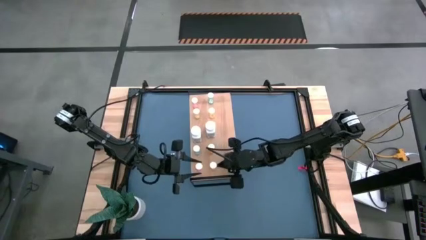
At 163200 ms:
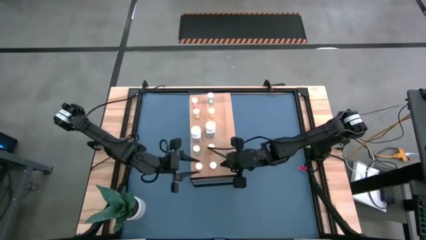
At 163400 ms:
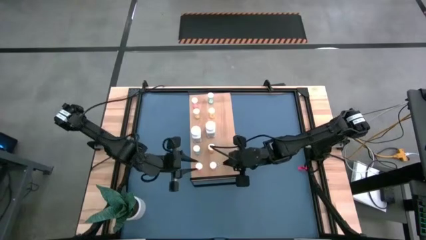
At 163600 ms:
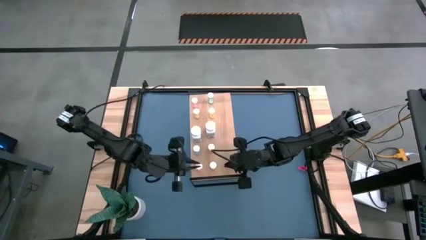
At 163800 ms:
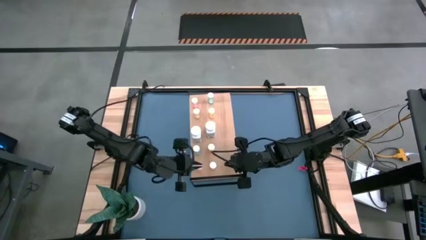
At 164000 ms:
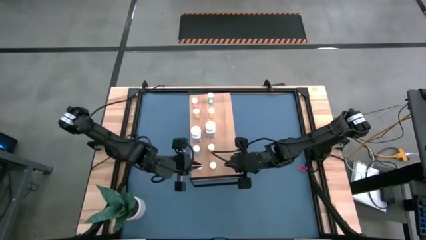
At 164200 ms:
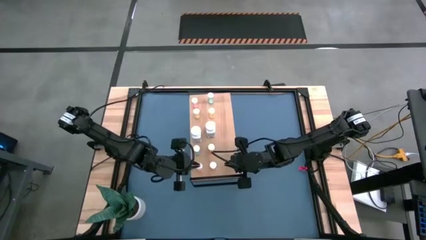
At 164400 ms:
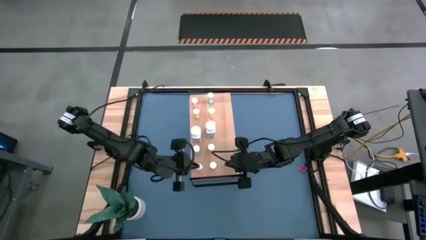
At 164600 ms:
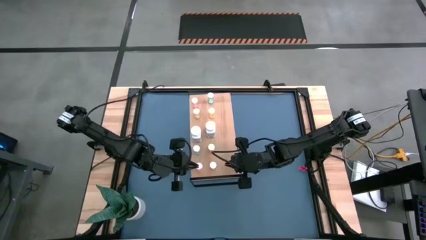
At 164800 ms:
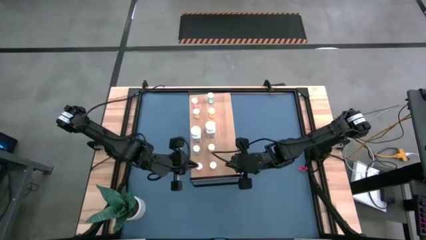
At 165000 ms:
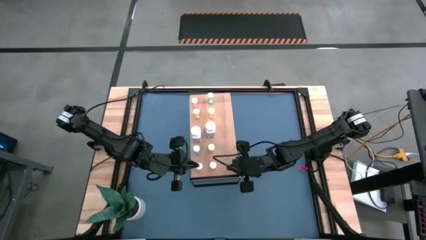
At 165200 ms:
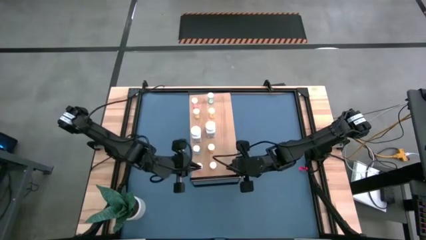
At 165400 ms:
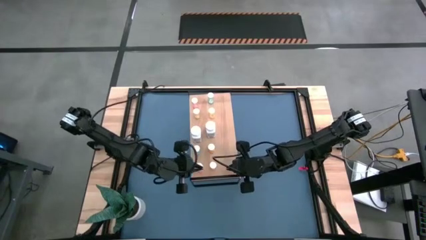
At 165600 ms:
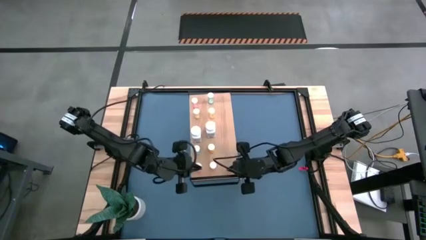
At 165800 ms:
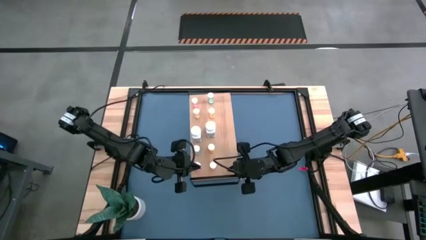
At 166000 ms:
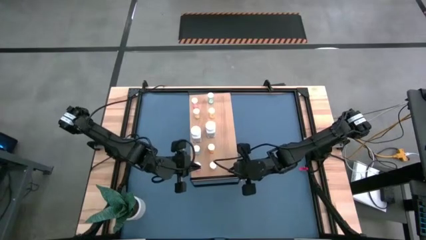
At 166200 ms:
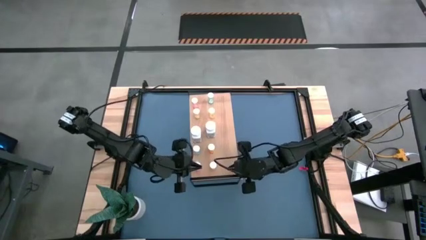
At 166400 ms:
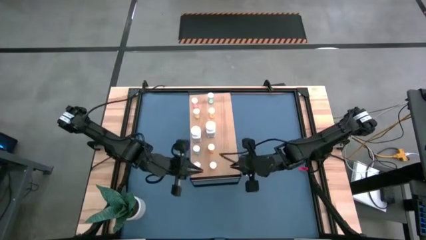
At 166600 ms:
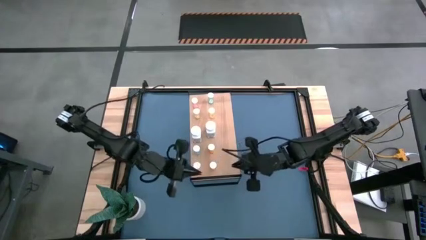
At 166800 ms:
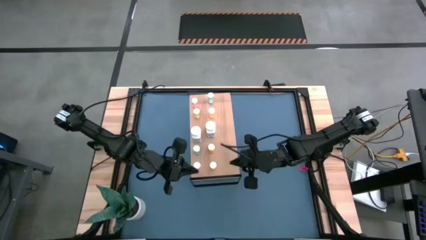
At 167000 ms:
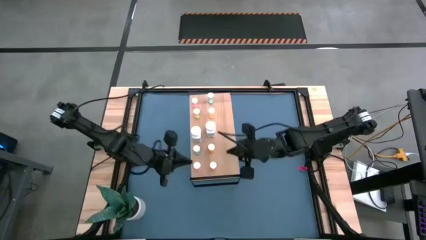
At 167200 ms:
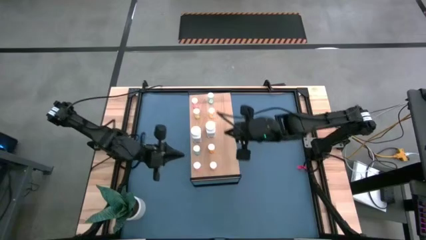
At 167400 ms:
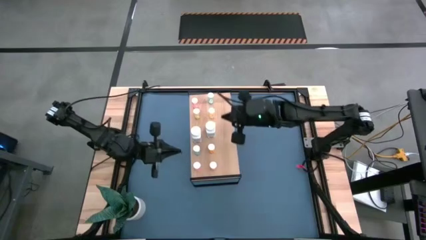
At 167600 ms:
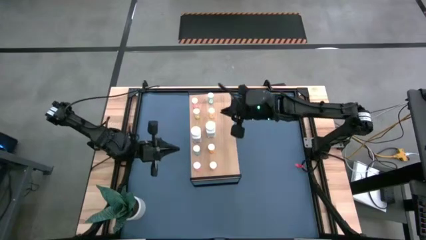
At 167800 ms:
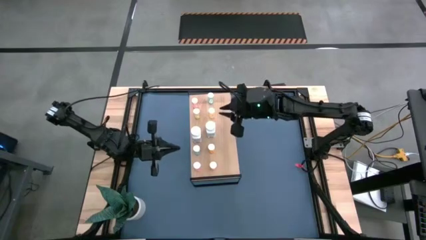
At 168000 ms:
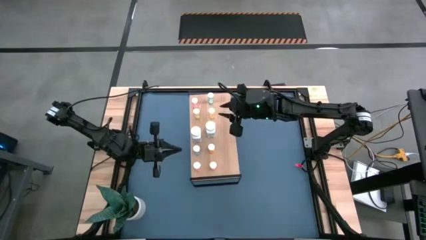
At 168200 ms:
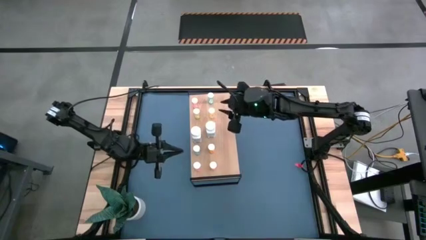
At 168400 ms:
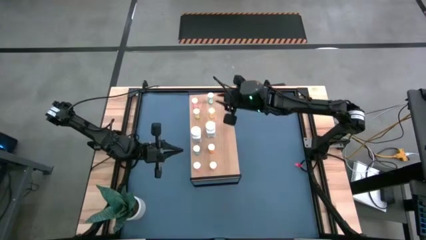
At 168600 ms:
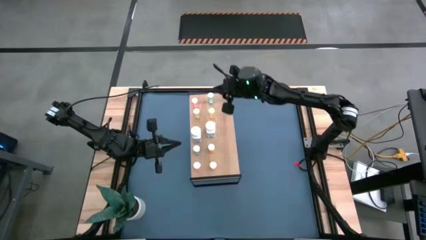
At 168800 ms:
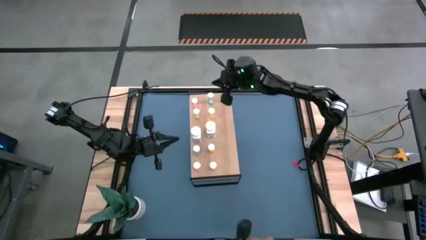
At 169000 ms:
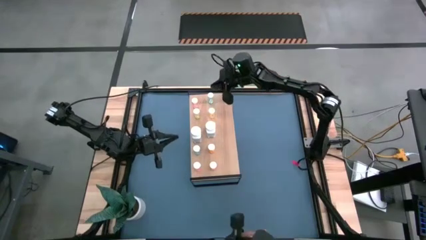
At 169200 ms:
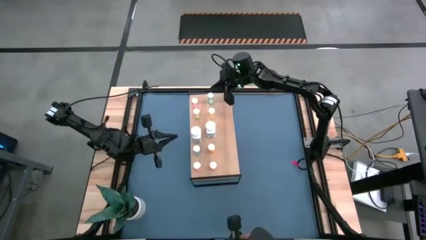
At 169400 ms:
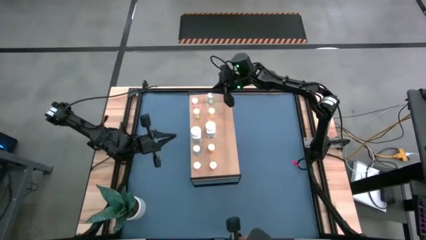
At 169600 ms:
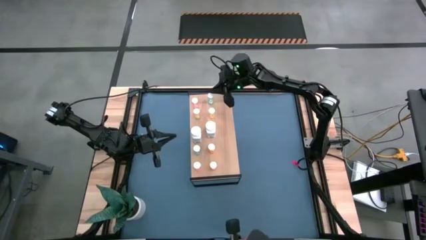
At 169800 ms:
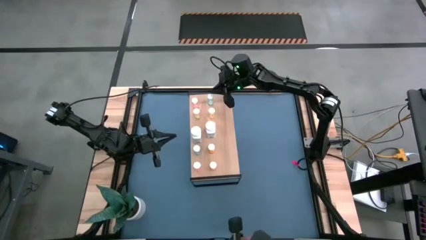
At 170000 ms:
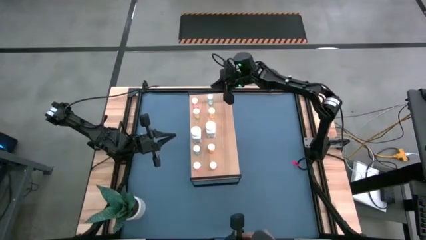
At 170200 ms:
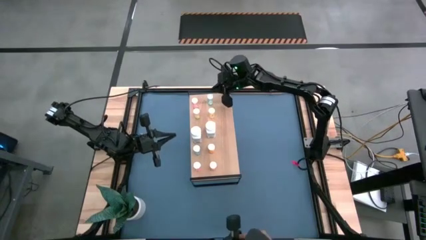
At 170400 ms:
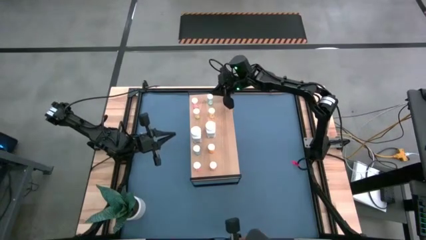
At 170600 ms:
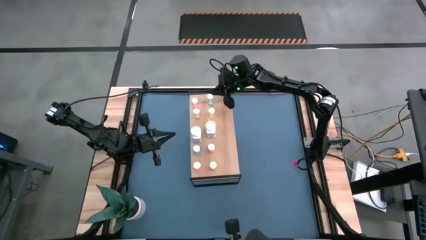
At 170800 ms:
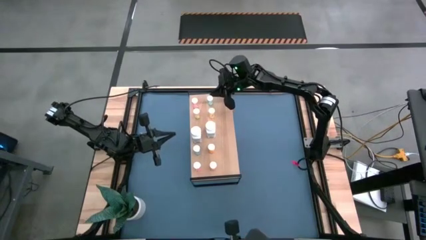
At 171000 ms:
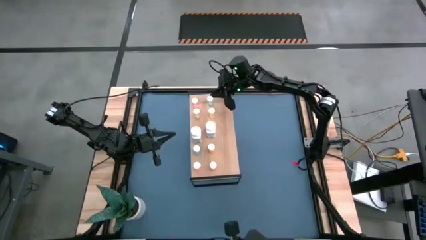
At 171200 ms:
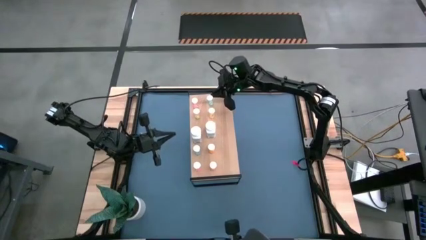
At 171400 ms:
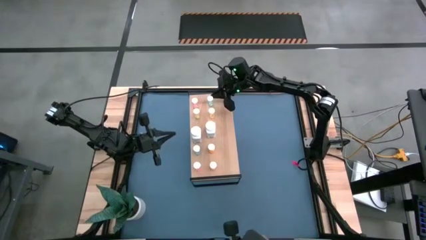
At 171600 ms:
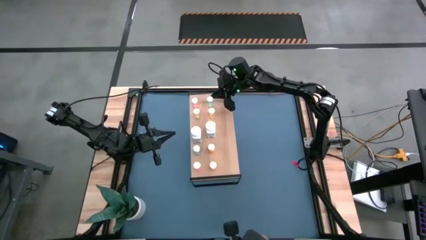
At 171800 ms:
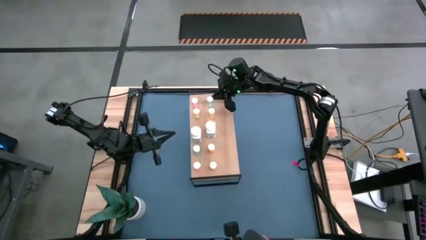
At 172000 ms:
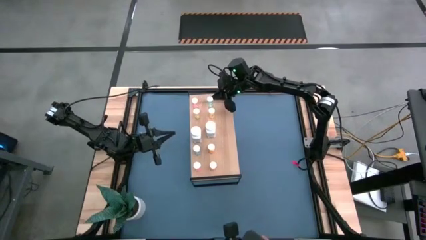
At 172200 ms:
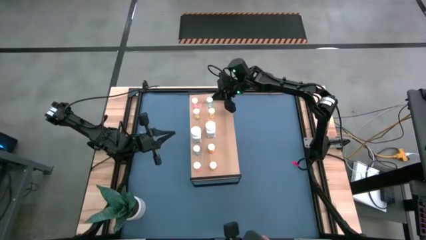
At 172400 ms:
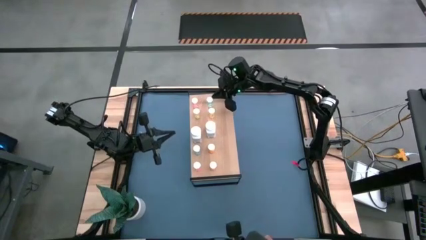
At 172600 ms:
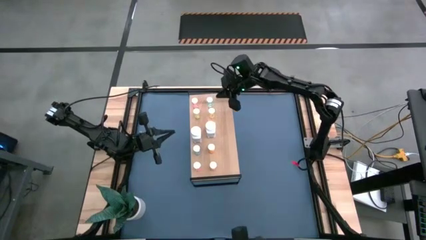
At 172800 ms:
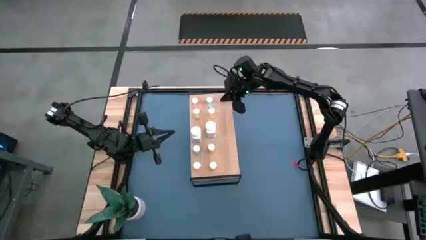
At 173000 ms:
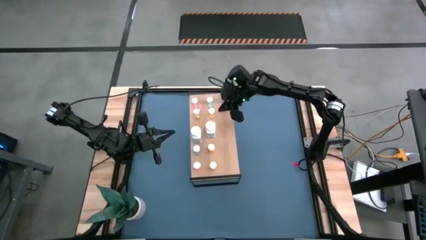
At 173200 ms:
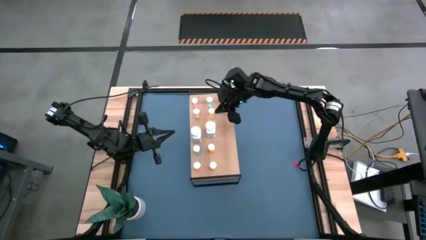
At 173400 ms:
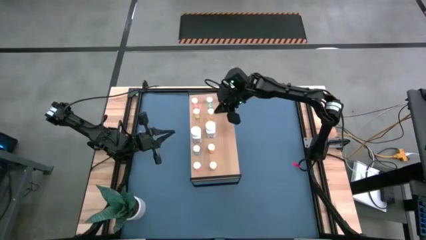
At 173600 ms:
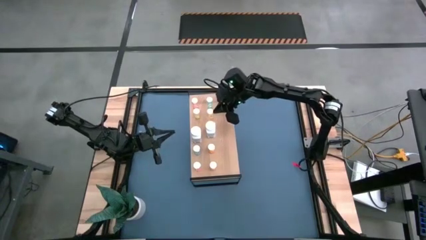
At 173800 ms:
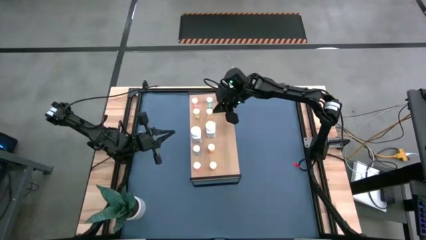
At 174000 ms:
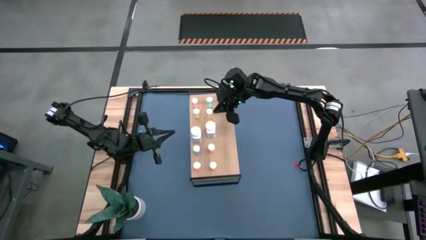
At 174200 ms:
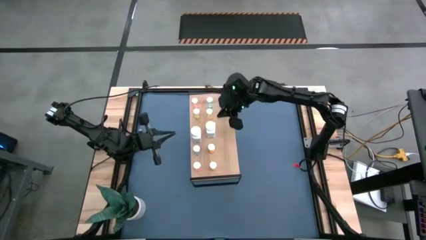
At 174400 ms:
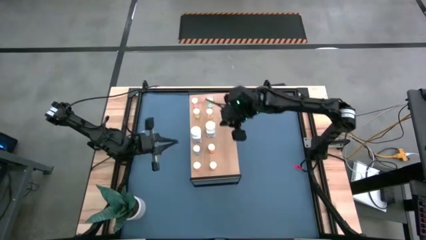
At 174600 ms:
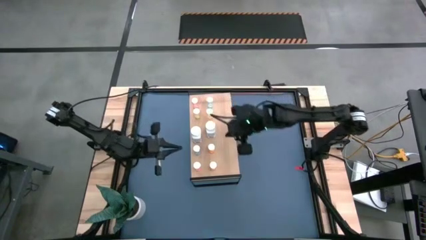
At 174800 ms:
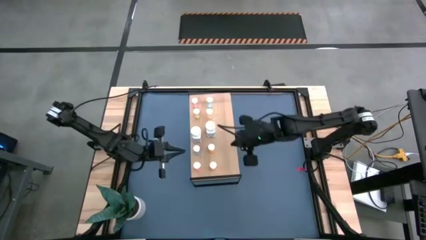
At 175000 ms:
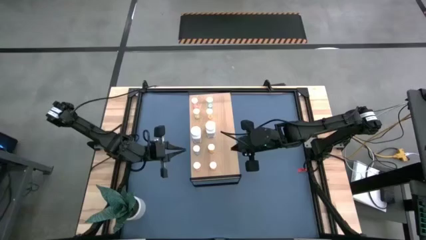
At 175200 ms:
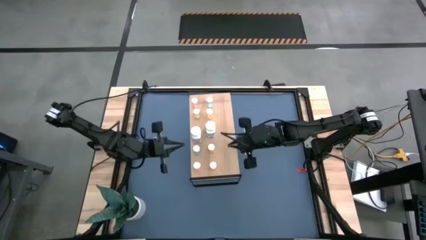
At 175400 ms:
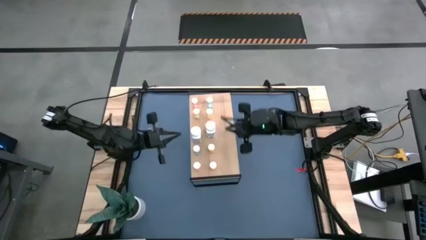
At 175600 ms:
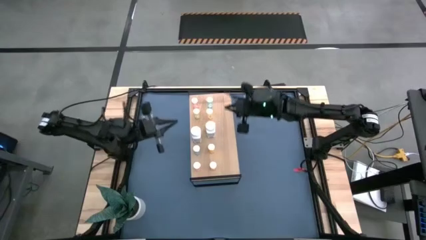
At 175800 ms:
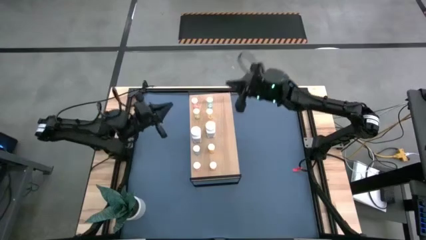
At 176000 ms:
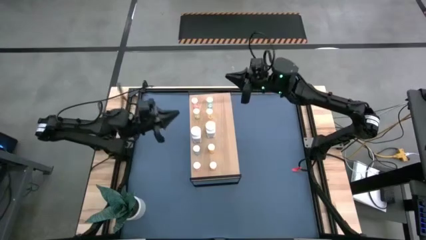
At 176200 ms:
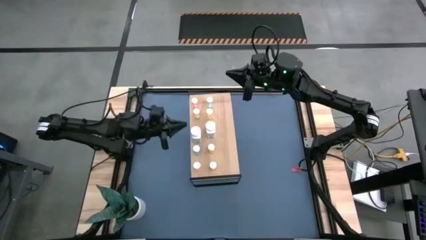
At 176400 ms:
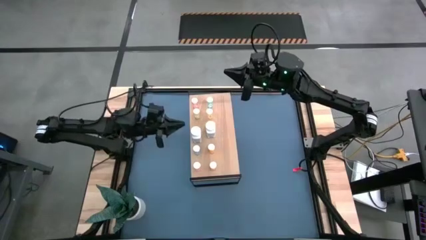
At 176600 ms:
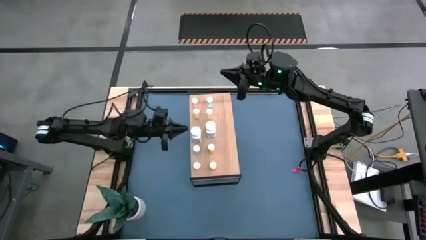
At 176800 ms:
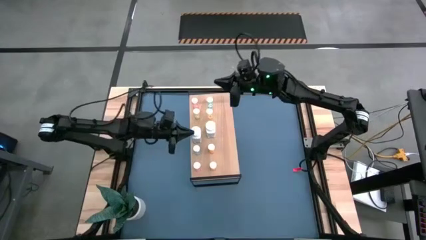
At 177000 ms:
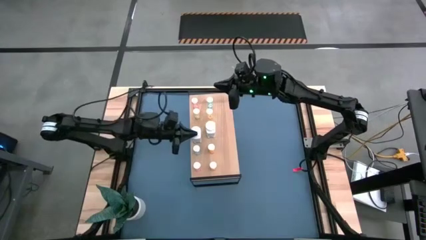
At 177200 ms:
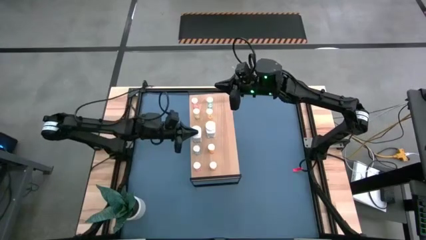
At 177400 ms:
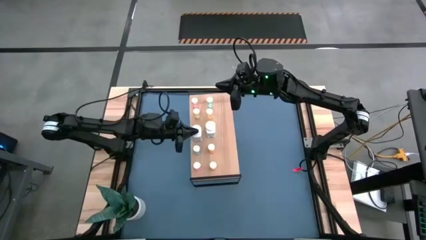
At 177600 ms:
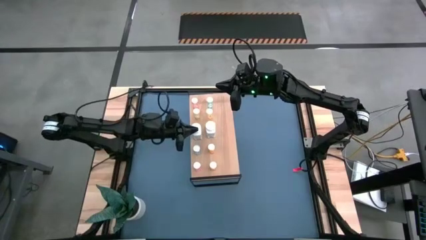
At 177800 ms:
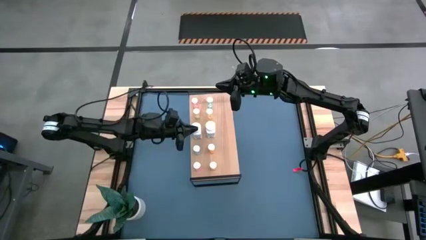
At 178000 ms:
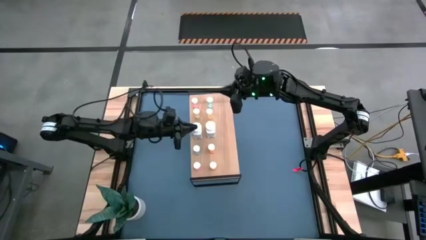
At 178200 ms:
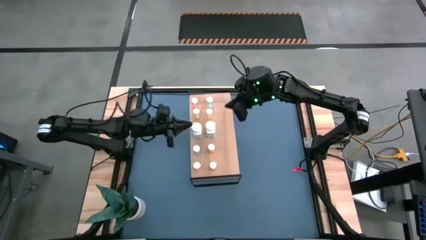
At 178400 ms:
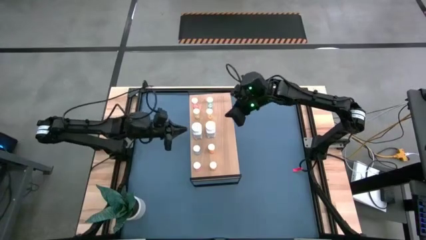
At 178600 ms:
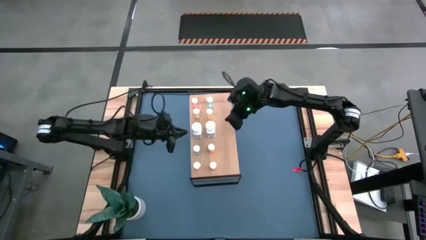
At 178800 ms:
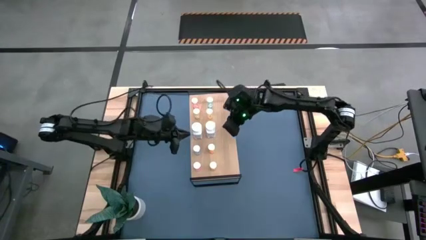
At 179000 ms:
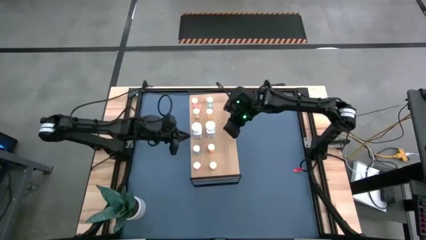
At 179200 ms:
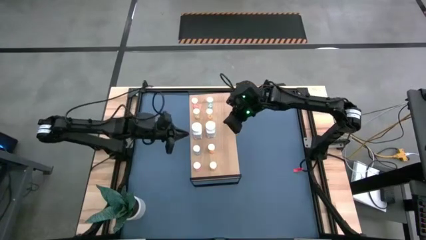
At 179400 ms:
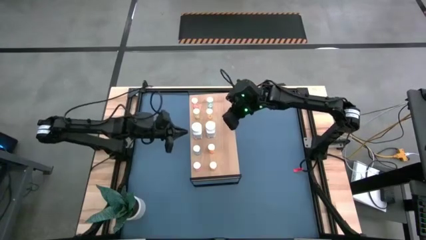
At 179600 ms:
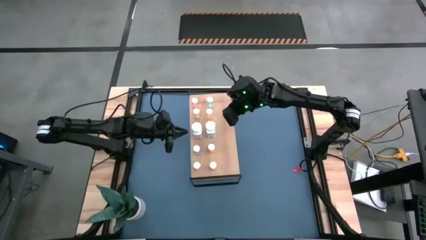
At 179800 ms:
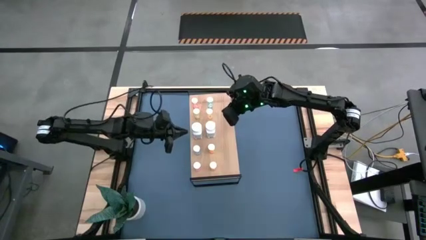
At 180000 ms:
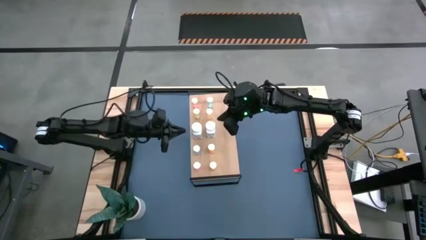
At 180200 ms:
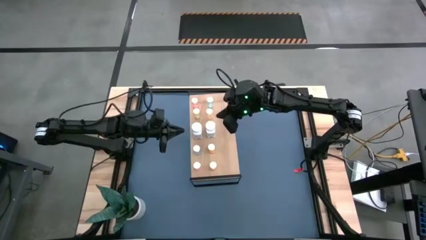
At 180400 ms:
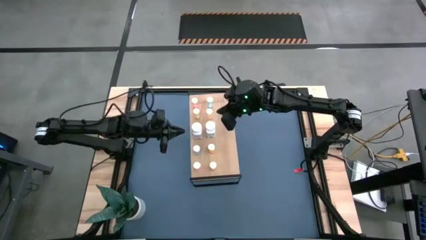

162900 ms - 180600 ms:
Task: Pick and place medicine bottles onto shelf by color
Adjust the pill bottles on the shelf
